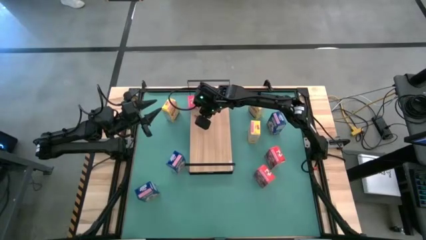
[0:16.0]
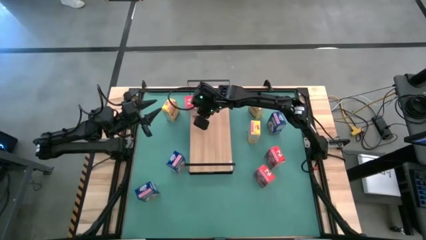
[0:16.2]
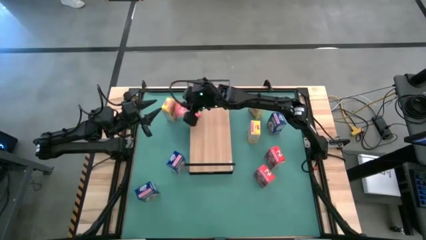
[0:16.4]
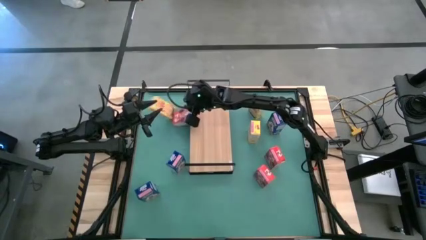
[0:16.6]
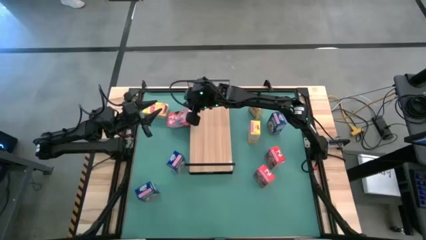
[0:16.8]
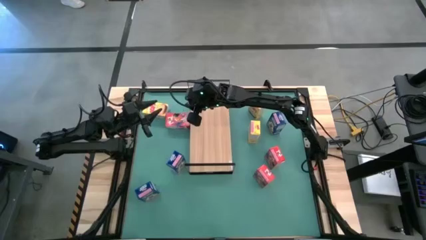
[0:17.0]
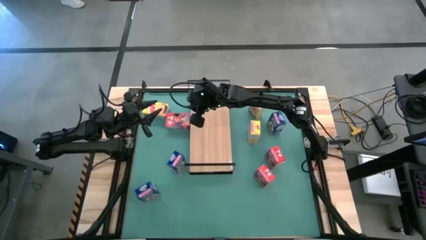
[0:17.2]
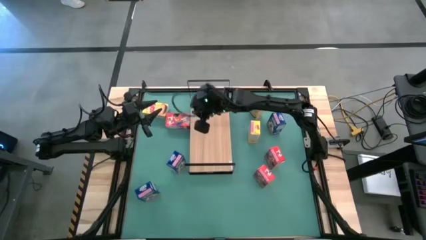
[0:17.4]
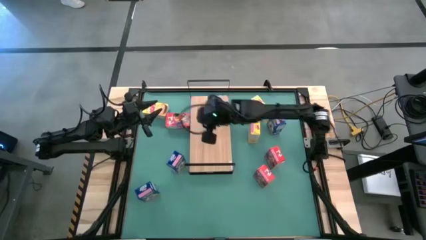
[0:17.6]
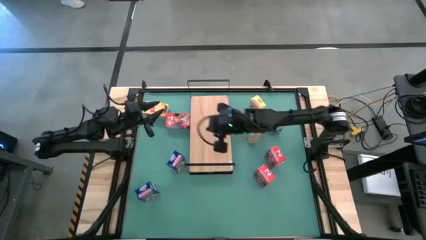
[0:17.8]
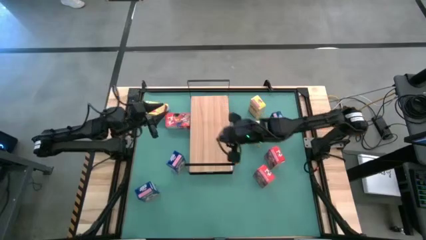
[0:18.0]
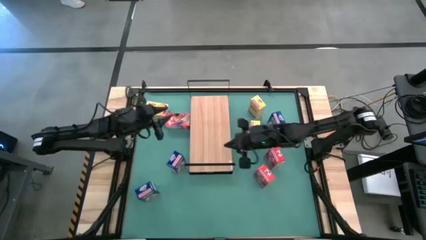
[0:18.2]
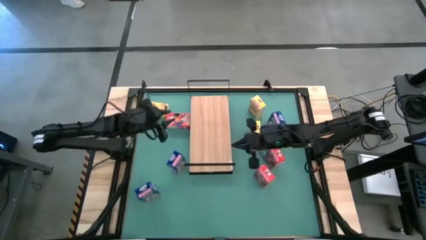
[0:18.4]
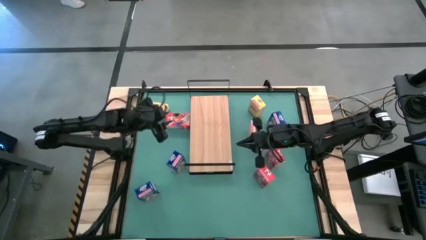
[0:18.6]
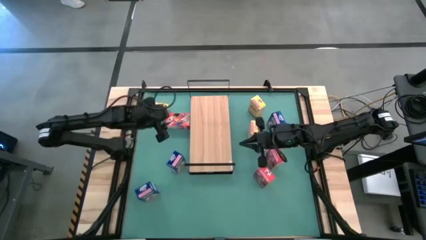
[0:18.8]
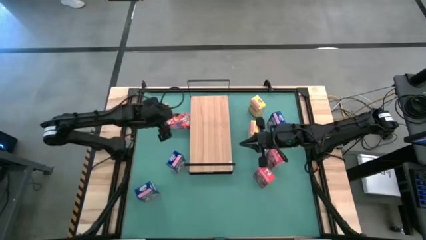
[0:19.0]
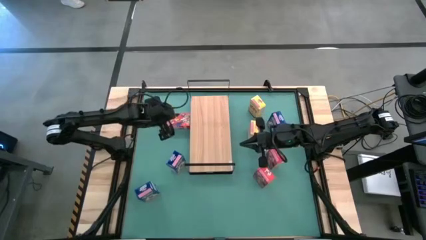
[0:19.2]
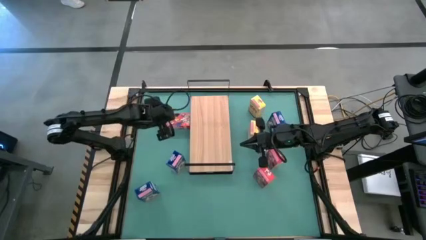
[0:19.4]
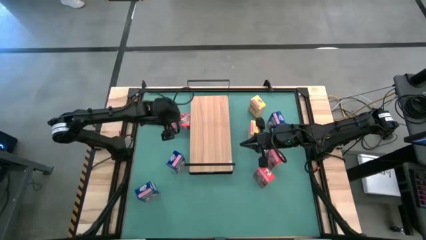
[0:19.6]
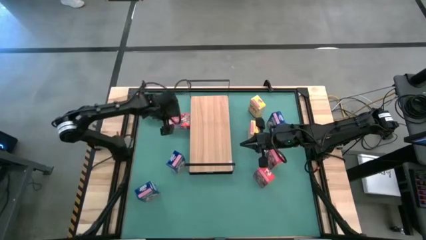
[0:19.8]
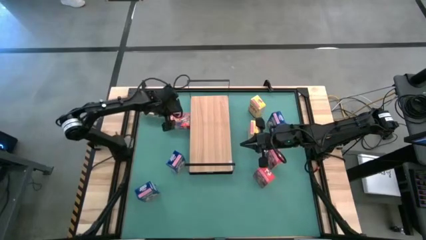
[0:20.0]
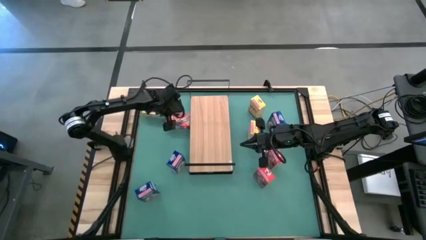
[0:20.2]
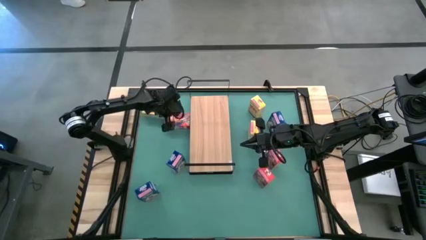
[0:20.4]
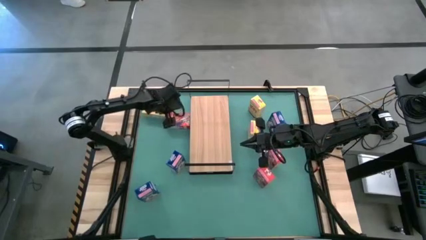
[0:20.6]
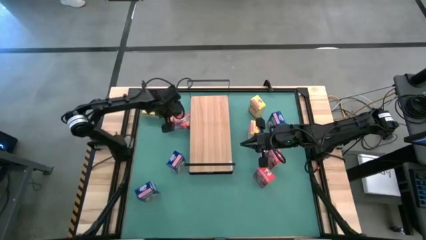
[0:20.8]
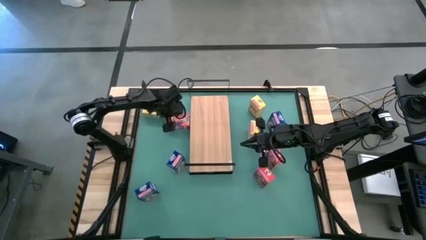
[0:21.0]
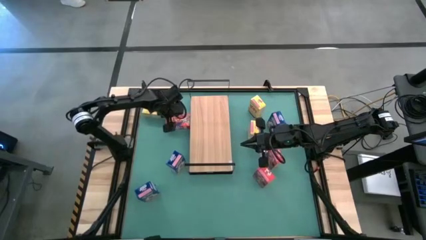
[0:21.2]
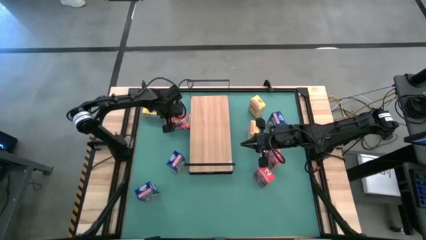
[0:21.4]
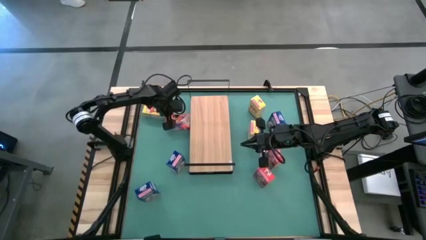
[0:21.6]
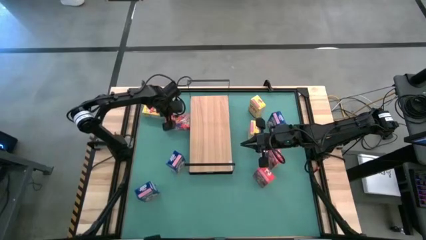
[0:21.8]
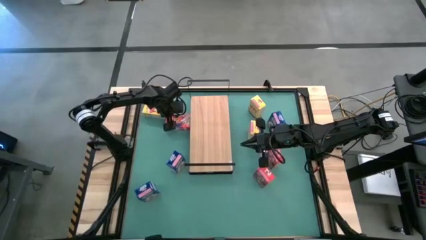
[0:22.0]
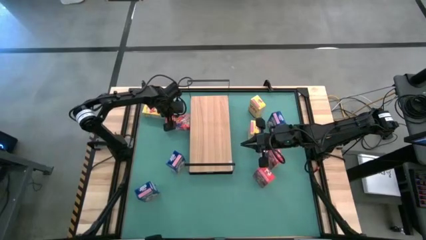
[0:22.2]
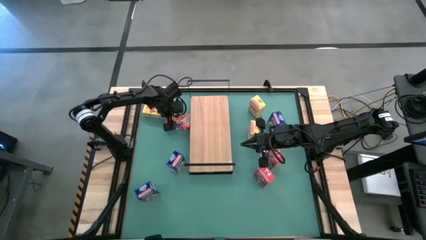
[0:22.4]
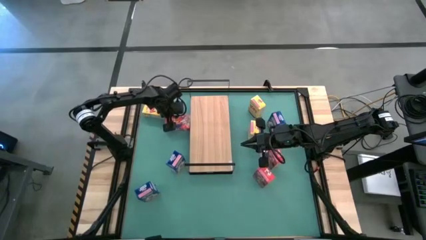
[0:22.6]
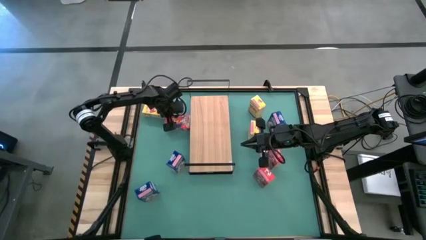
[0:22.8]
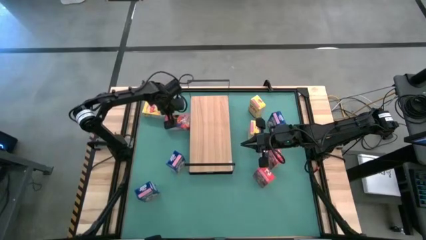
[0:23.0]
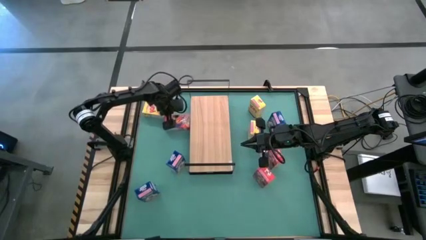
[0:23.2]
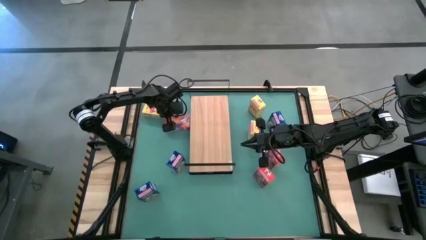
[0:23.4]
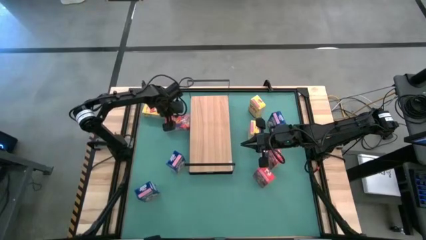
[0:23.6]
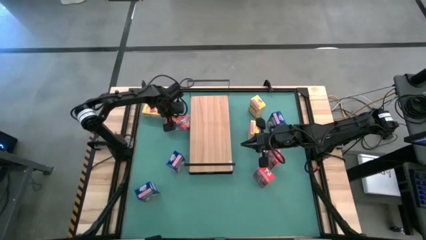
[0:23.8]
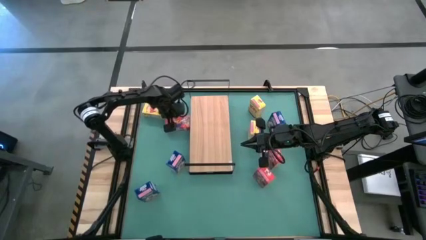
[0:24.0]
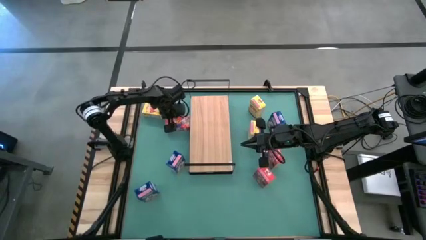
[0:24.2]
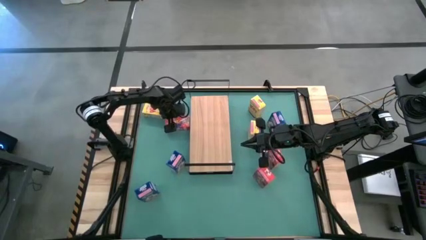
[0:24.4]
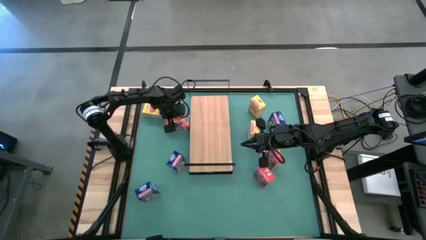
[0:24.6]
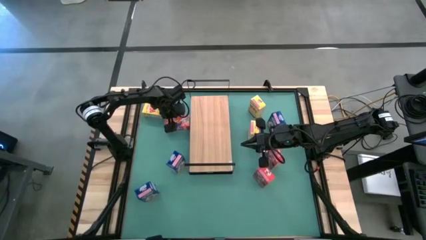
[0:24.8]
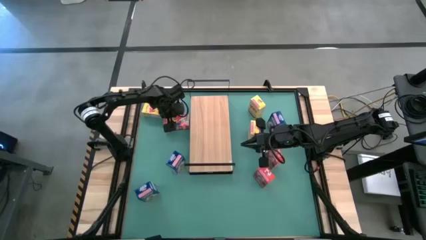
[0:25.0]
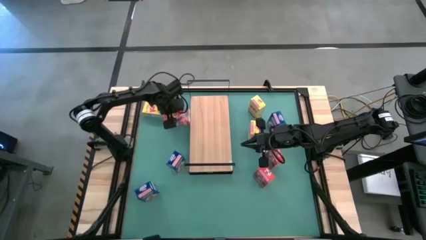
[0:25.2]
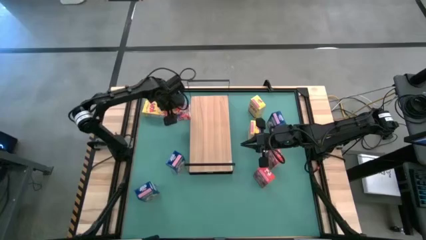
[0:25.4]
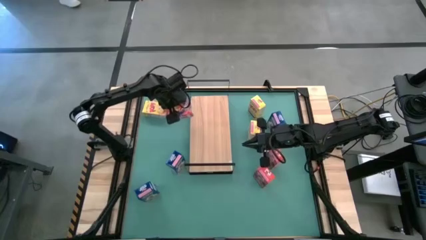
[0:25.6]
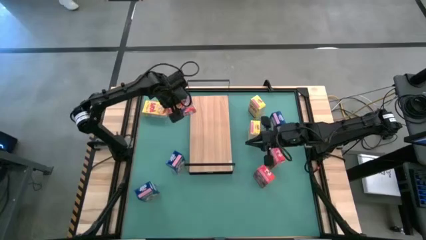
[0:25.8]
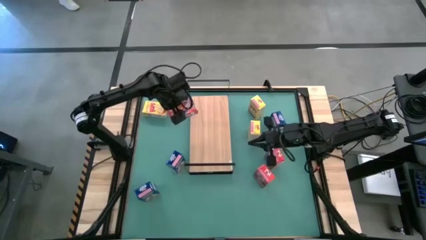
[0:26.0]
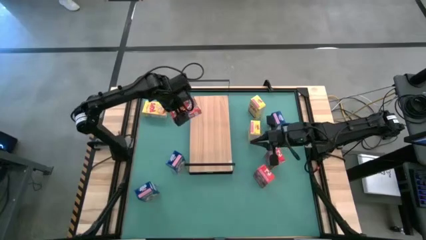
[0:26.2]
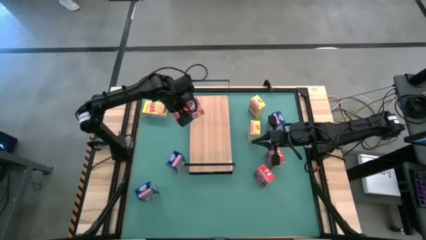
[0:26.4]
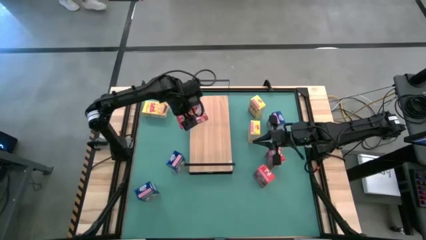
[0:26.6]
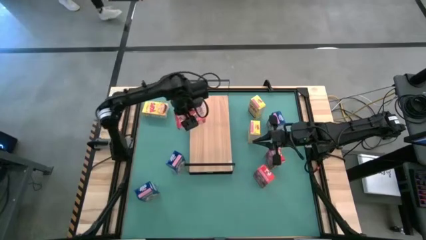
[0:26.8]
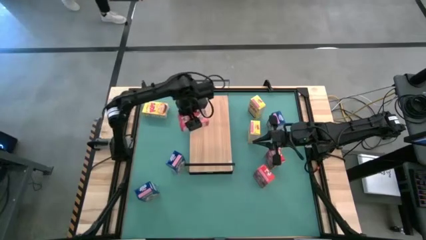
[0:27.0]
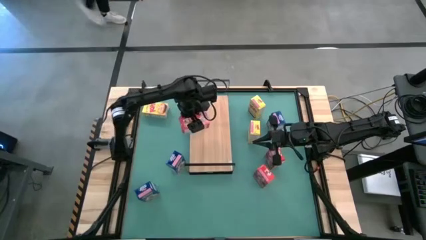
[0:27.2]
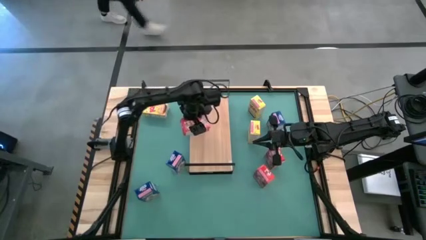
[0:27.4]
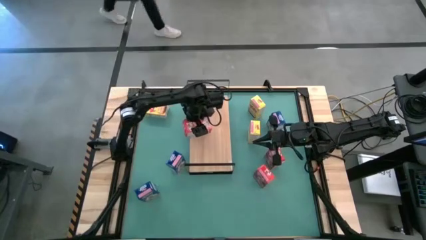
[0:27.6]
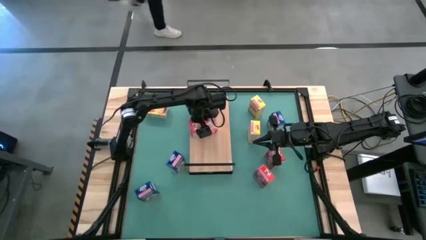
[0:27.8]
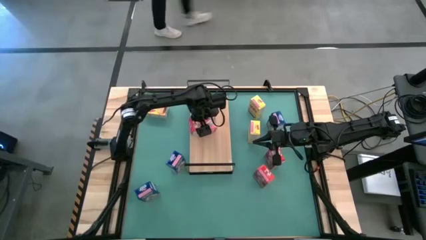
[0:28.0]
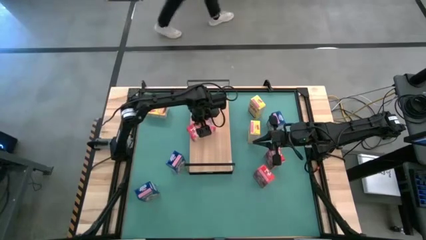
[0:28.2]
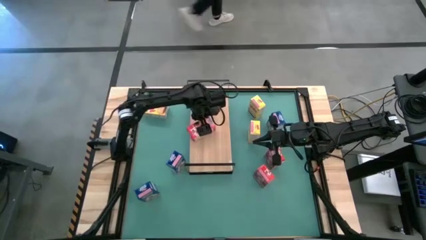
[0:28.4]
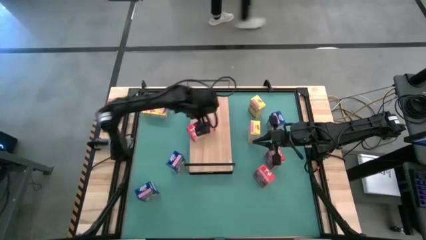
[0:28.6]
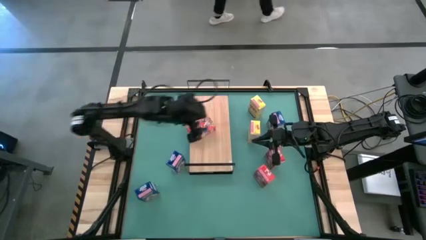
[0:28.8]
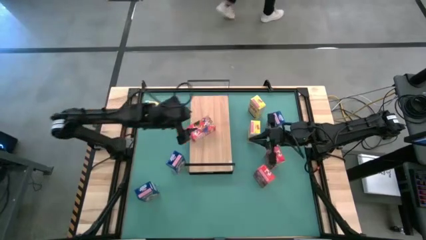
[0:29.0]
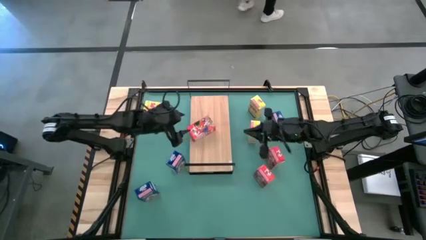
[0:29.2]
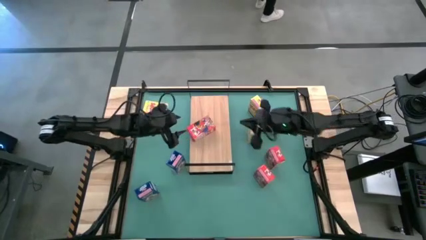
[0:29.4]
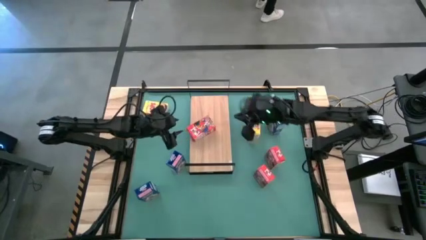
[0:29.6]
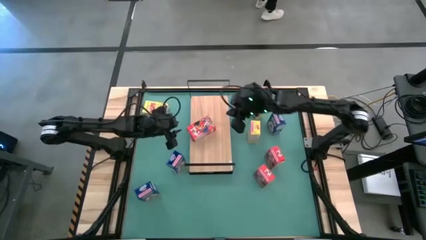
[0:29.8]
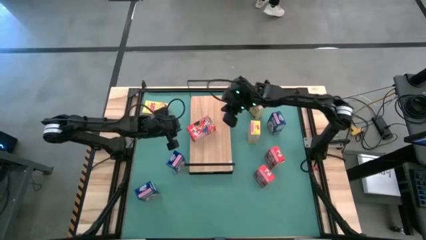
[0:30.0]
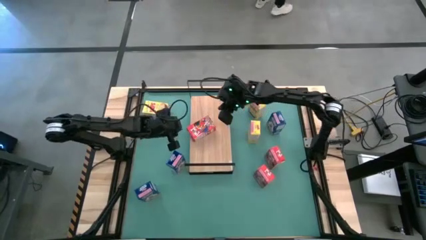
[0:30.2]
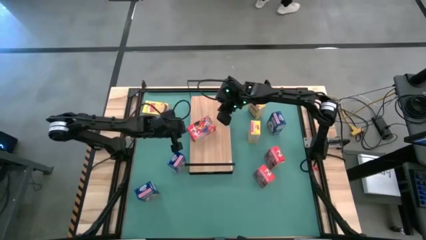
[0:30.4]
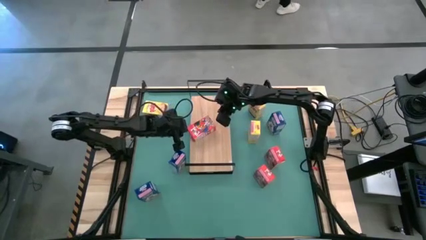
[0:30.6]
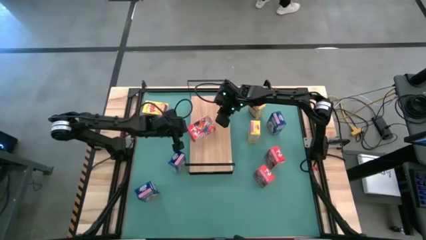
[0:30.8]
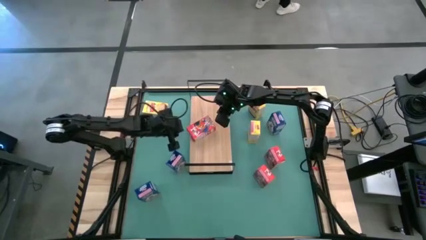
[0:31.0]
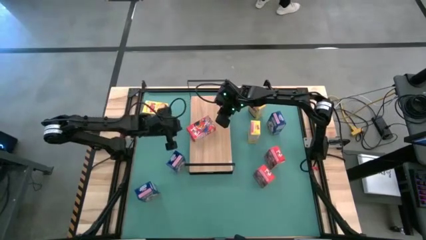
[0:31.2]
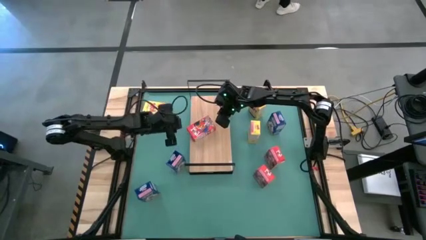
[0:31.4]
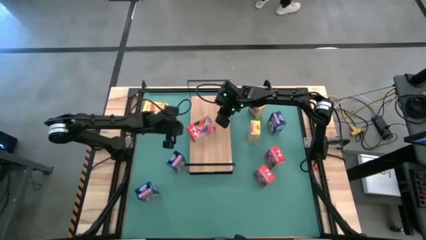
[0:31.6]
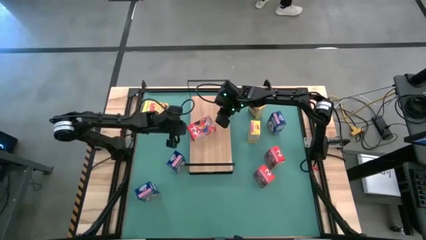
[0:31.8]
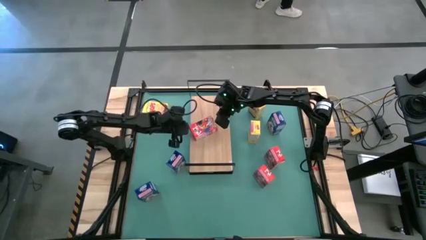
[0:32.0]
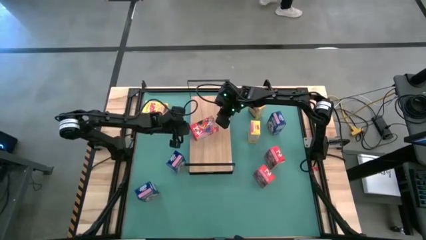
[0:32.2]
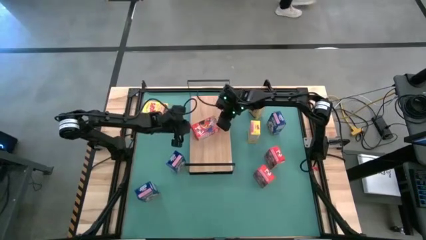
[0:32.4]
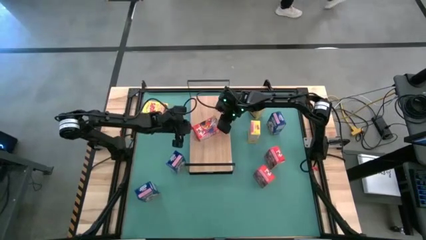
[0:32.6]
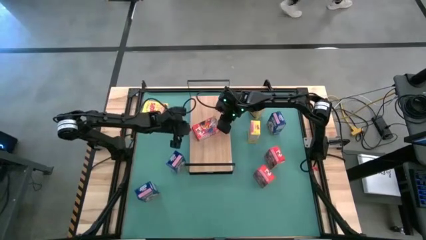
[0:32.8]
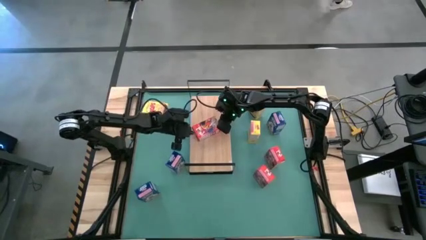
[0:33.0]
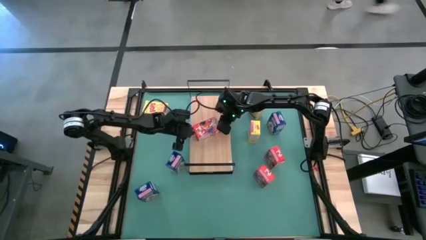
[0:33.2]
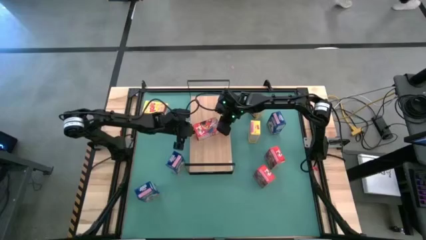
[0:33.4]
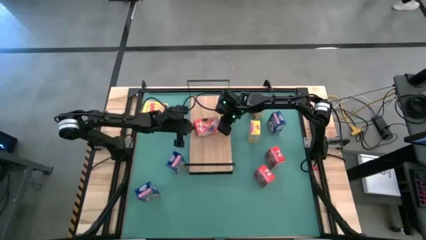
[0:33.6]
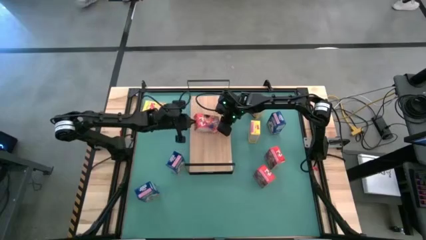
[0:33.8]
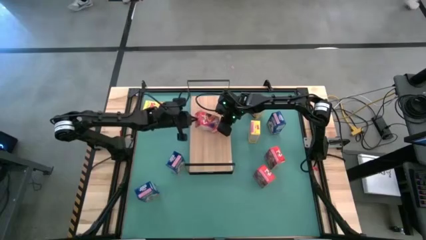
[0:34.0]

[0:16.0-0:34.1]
Task: Stack cereal on shelf
Put the top red cereal box on the shelf
